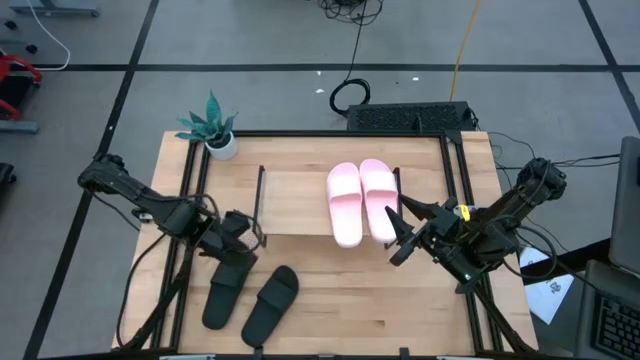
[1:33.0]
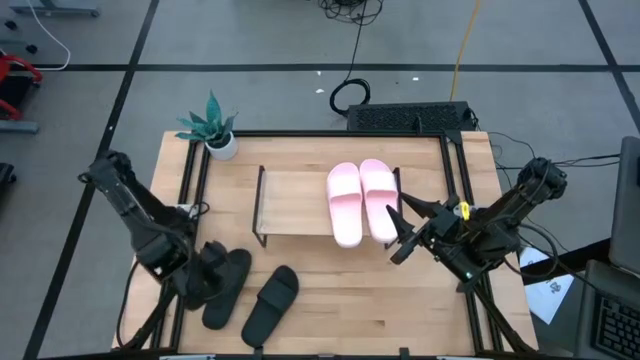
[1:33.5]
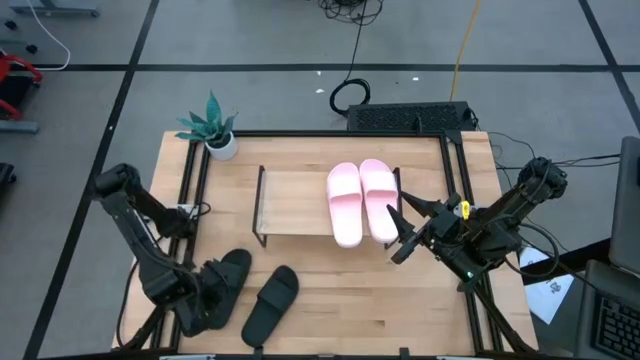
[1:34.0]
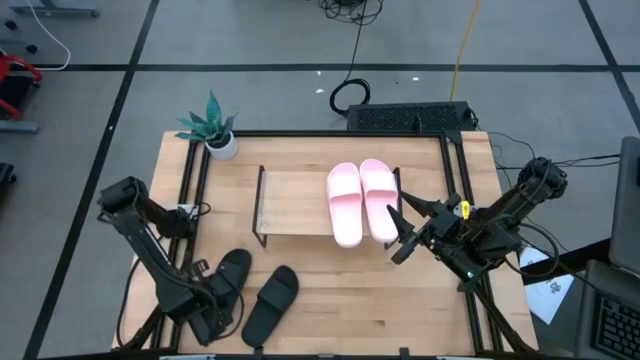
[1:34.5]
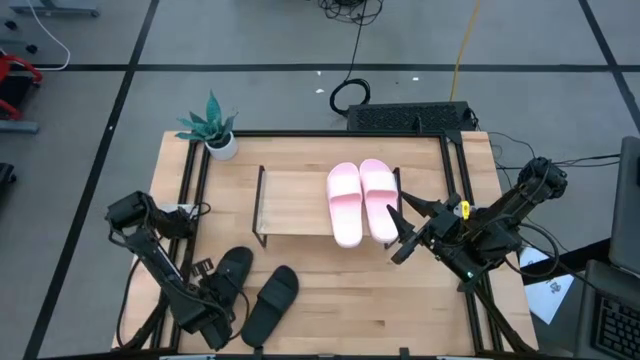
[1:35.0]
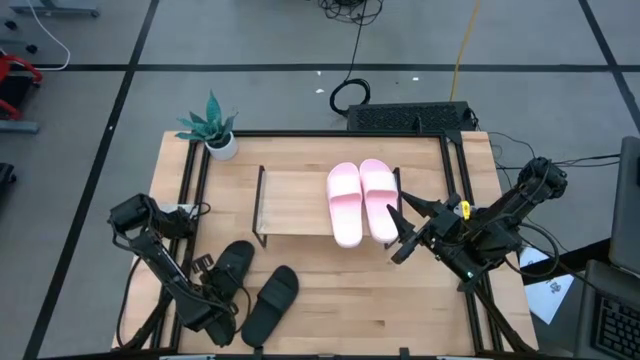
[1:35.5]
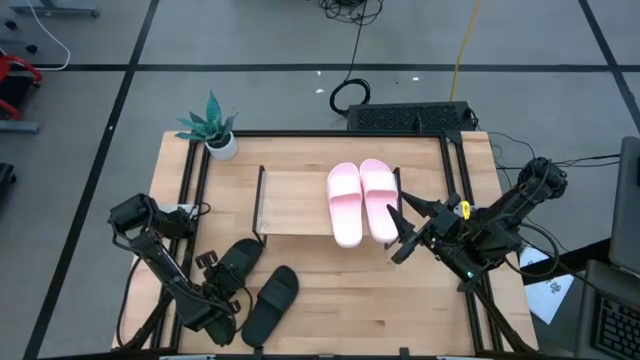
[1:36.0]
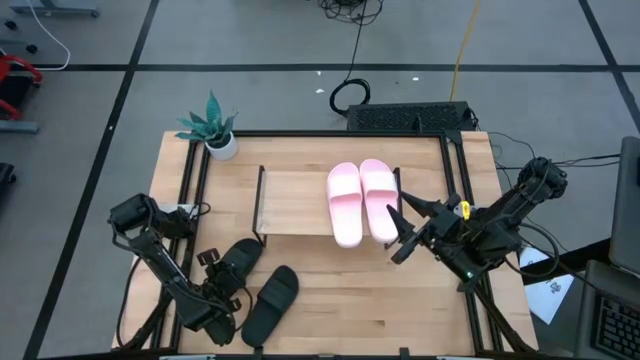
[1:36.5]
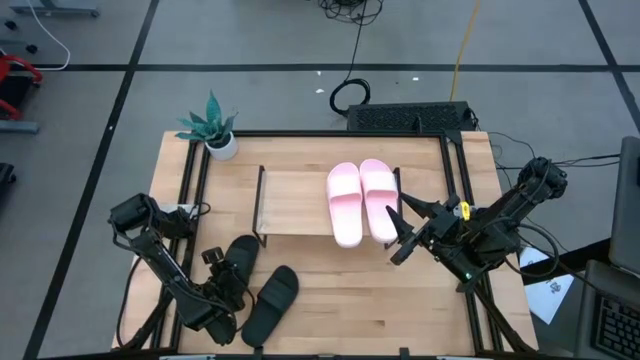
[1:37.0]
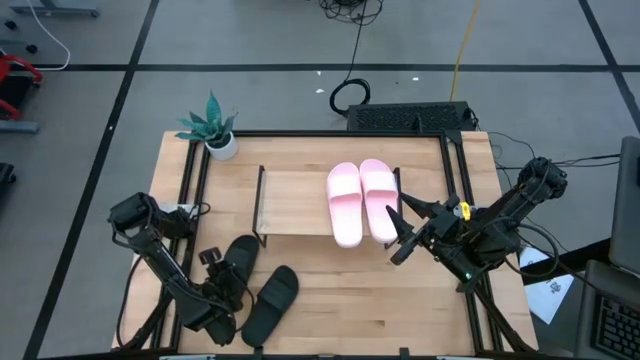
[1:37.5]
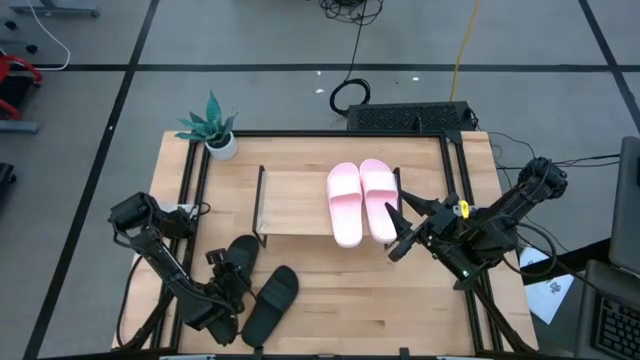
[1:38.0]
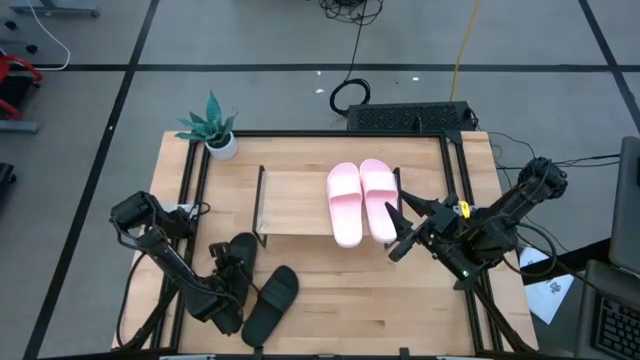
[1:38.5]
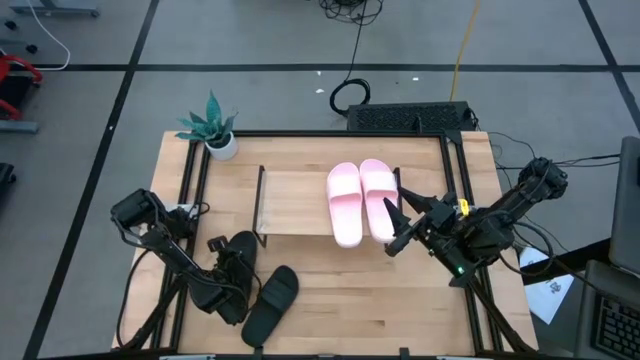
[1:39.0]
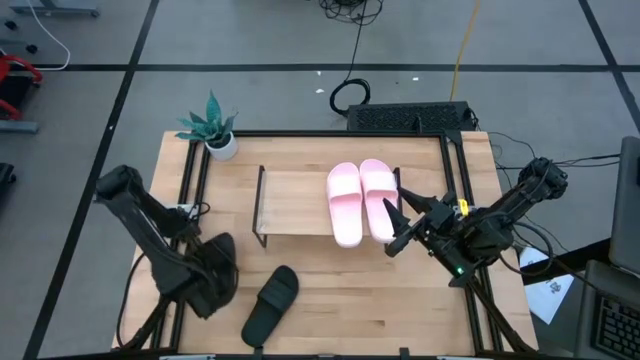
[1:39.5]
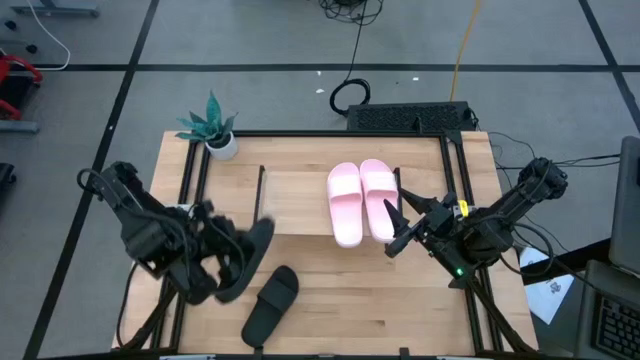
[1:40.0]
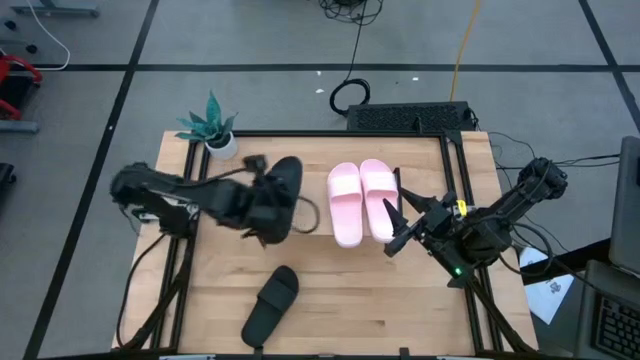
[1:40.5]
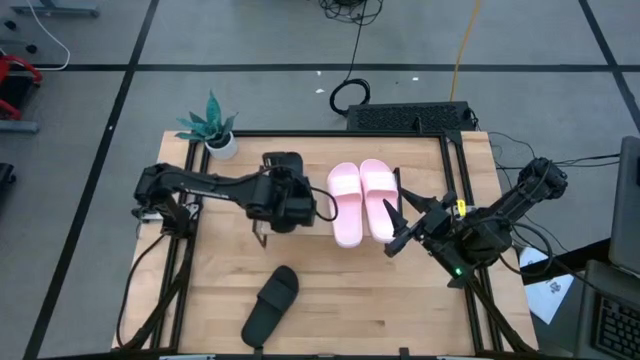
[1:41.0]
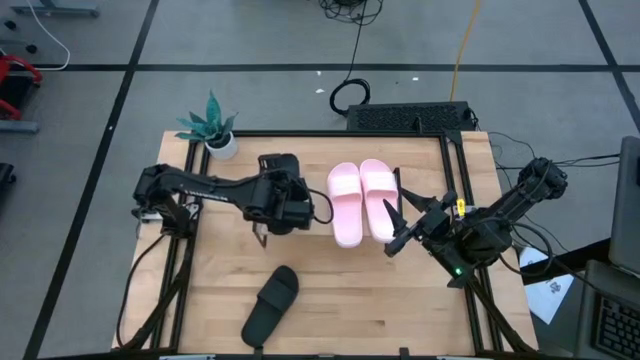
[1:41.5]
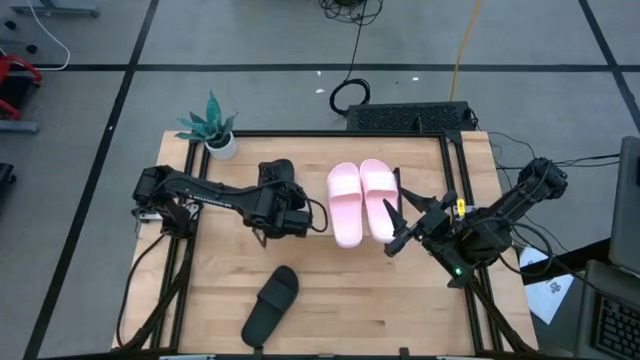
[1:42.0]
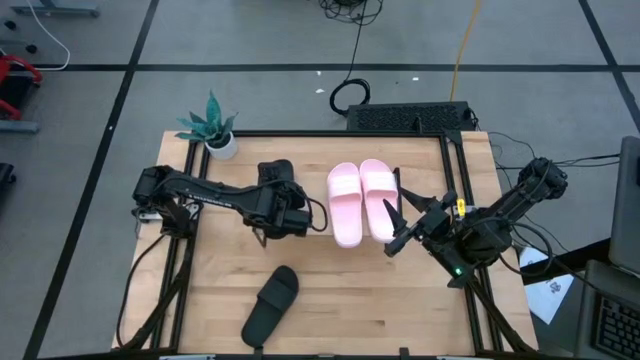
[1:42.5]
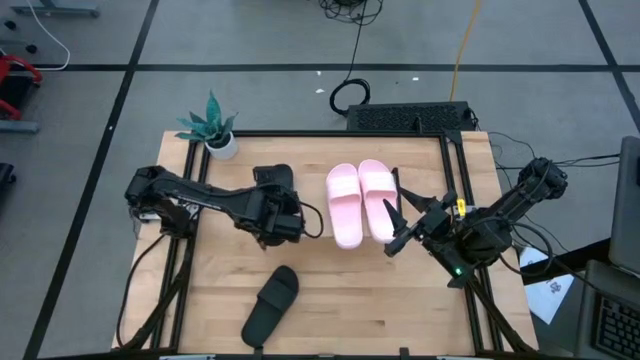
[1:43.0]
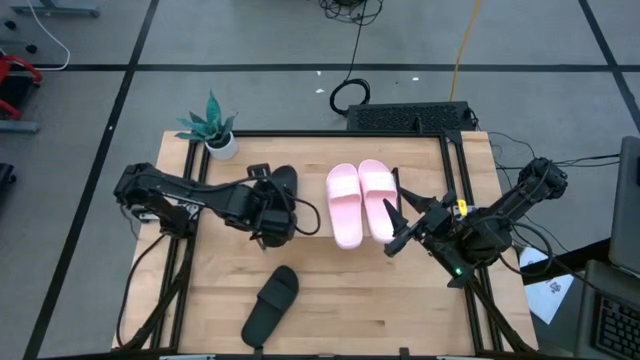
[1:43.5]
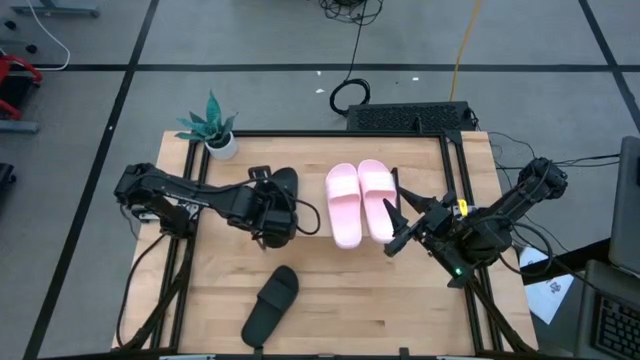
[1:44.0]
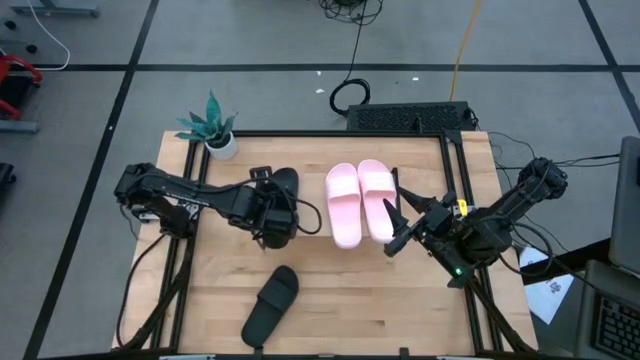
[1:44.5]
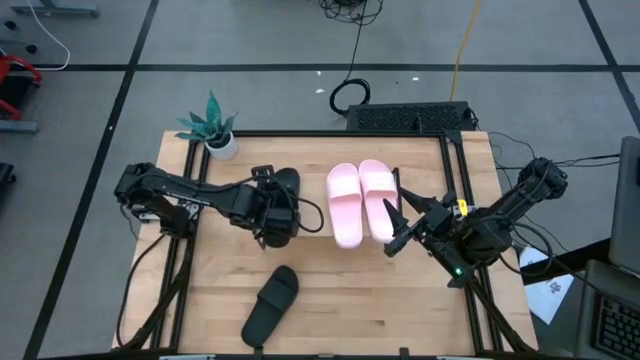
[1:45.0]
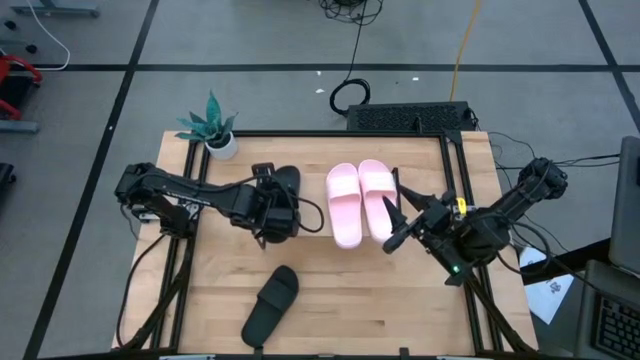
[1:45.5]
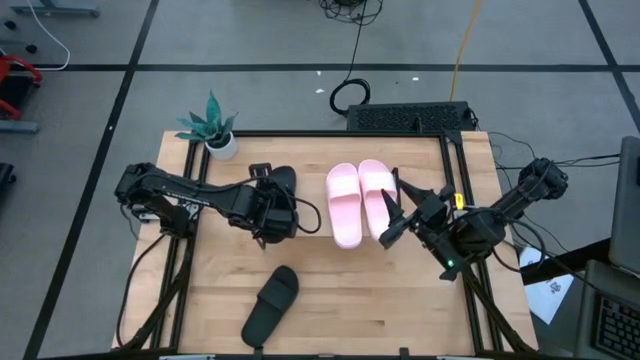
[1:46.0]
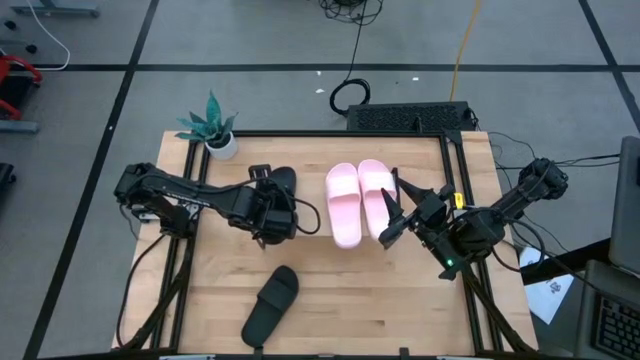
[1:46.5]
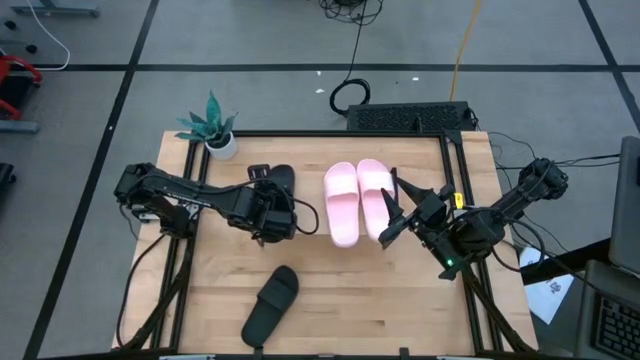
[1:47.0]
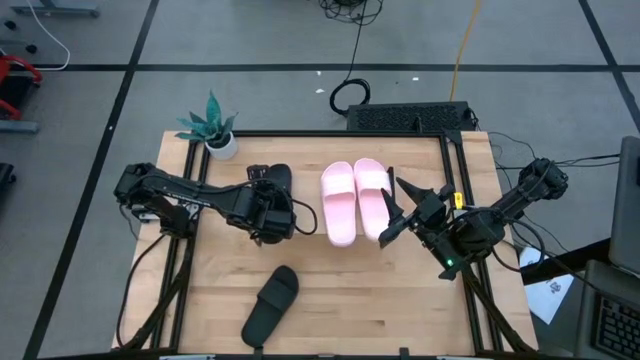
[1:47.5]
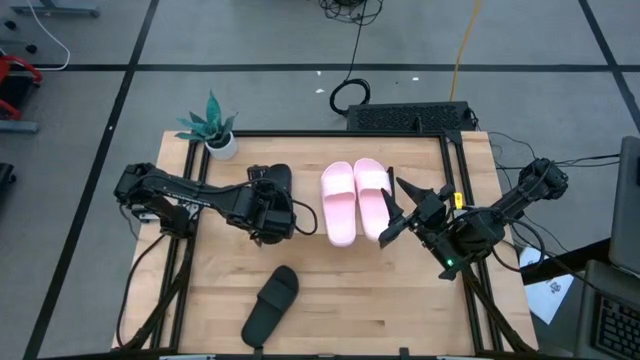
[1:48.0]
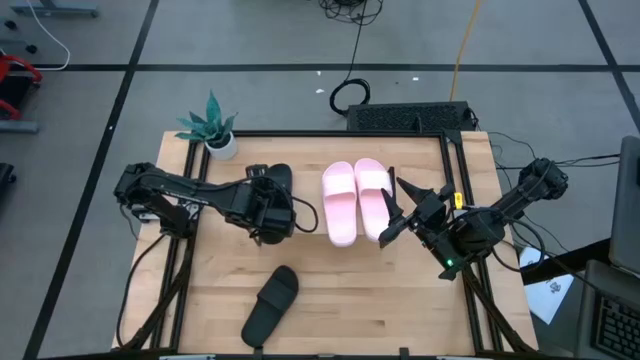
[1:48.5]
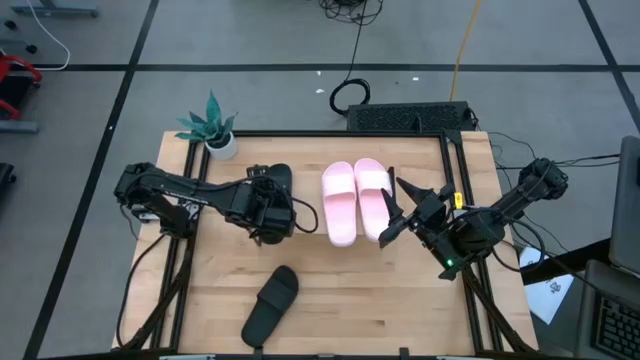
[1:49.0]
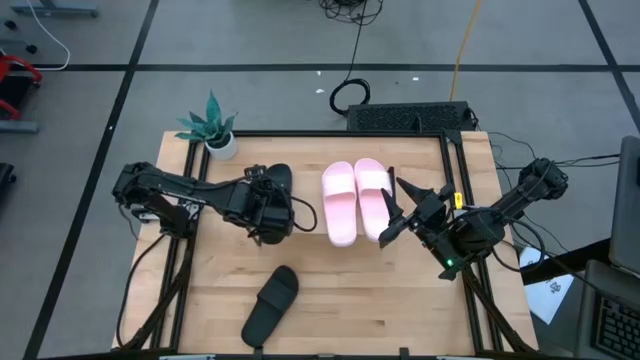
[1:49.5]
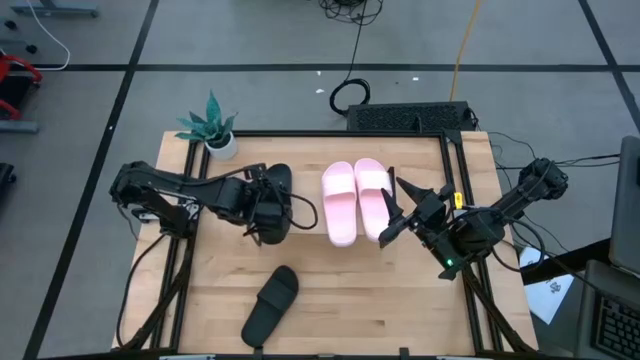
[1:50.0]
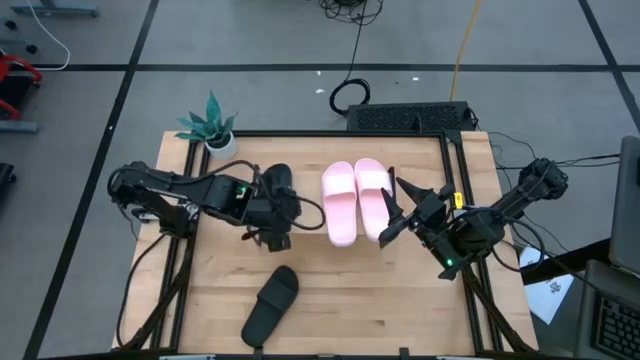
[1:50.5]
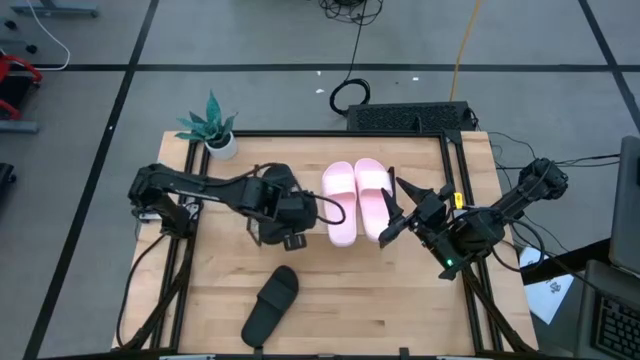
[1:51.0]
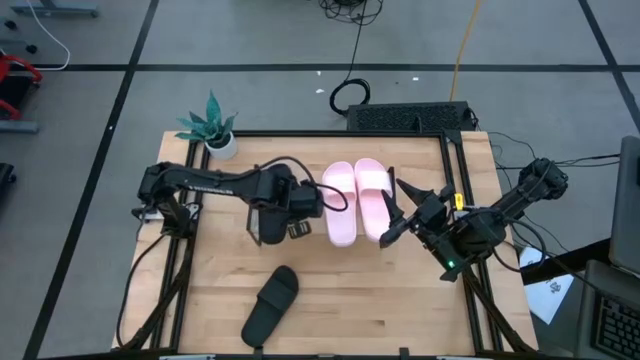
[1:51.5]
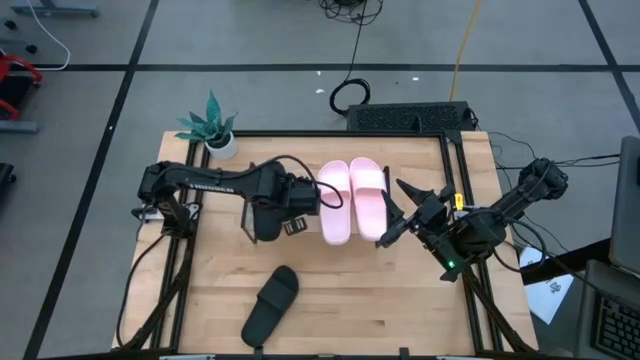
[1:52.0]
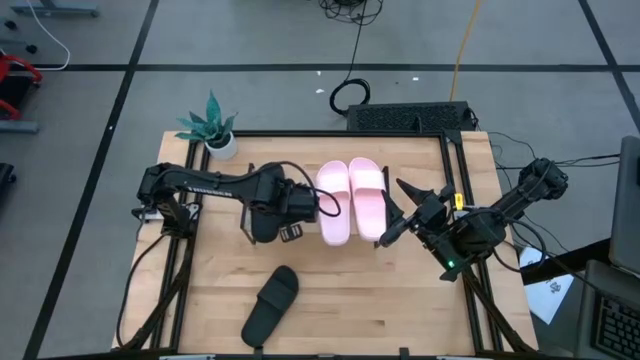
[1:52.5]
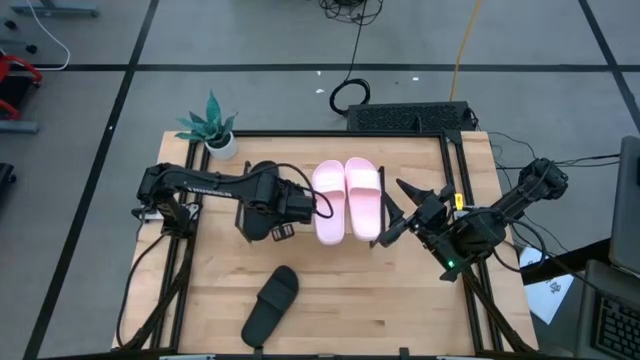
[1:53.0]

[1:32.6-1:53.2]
Task: Pick and place slides into the shelf
Put the left black slipper on the shelf

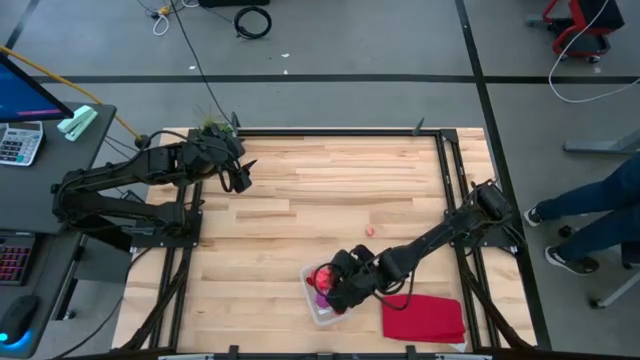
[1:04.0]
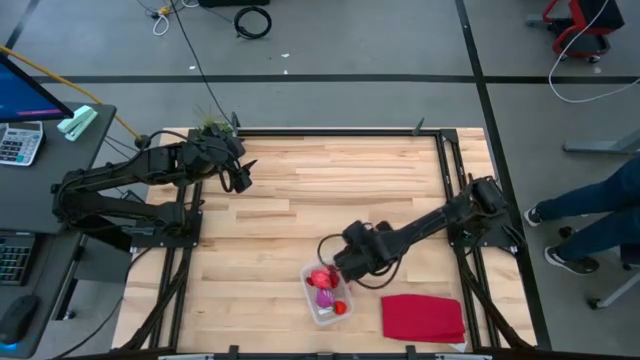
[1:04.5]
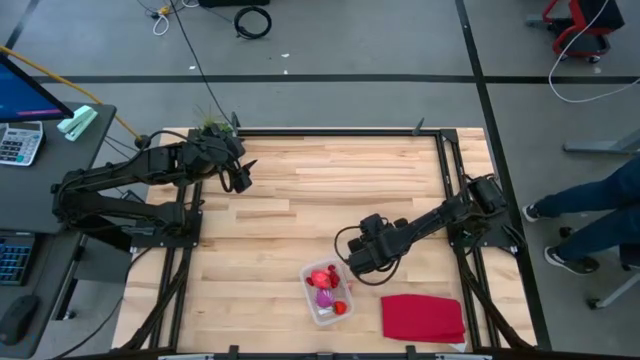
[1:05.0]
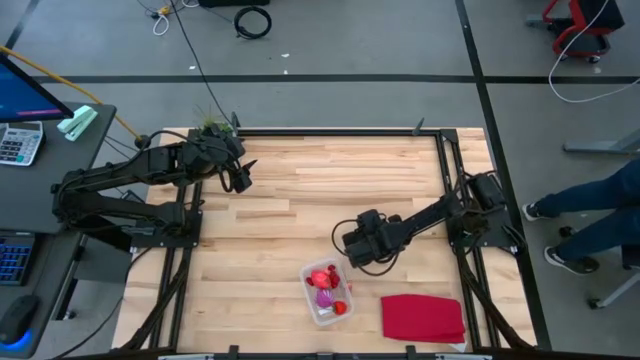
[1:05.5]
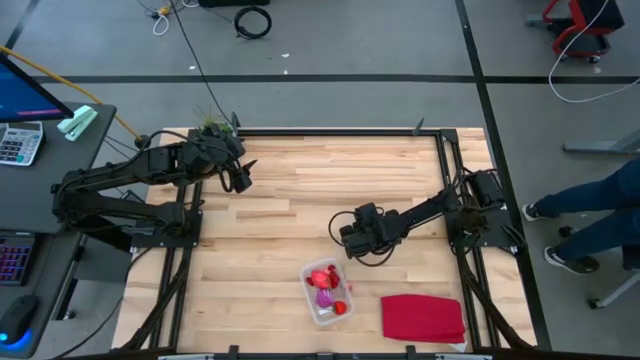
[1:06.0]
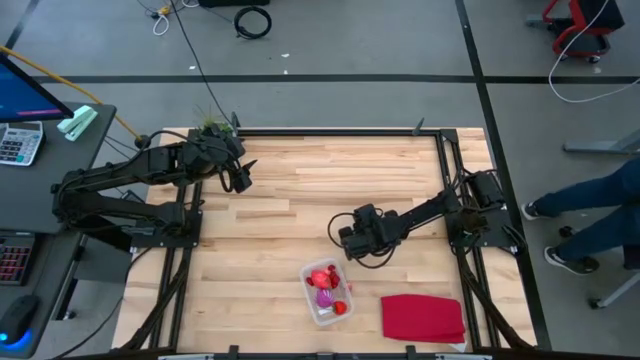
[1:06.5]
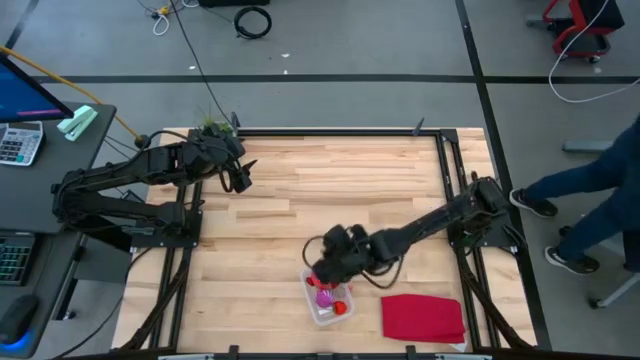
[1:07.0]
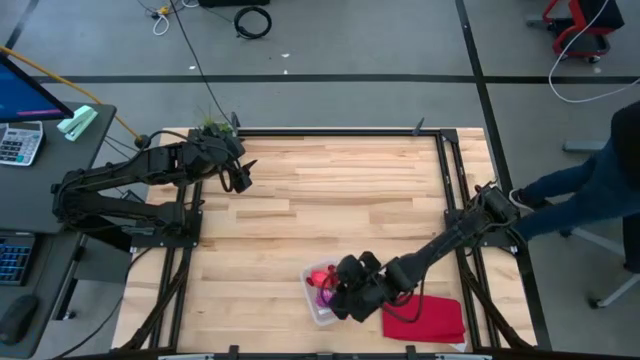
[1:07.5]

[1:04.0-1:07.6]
Task: Pick and placing Produce into tupperware
Put the top pink peach into the transparent bin
